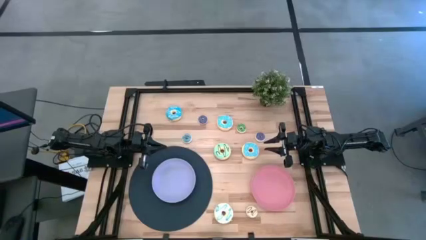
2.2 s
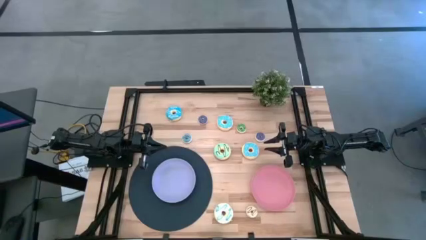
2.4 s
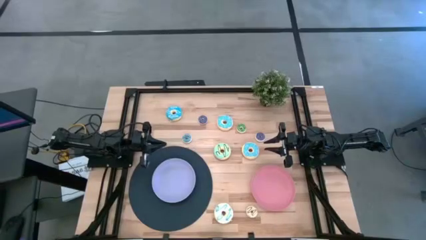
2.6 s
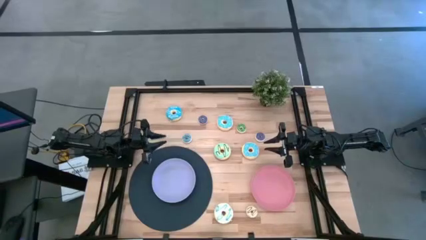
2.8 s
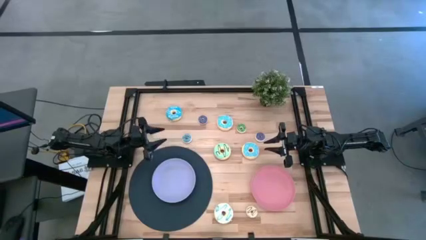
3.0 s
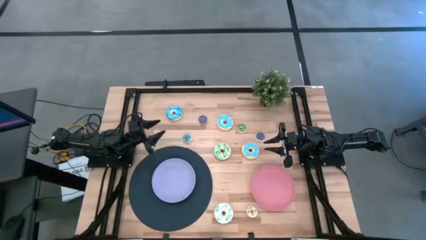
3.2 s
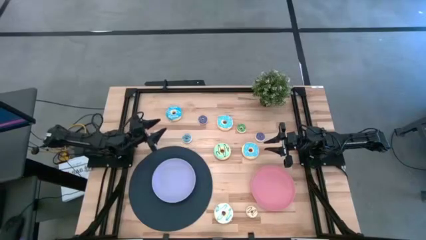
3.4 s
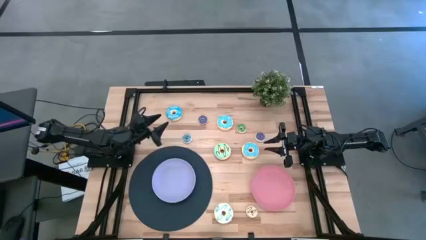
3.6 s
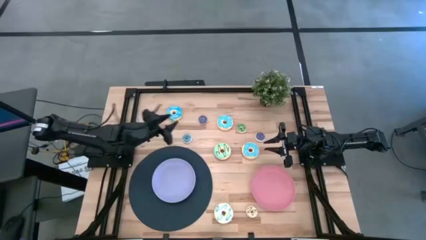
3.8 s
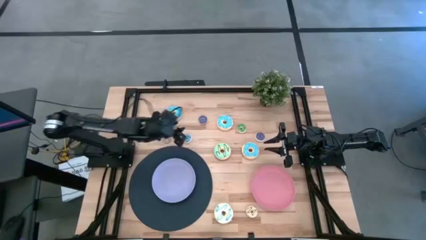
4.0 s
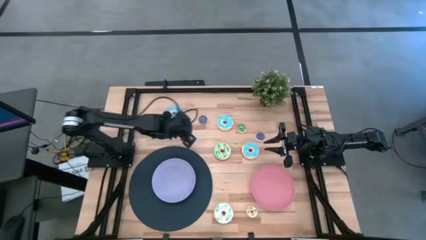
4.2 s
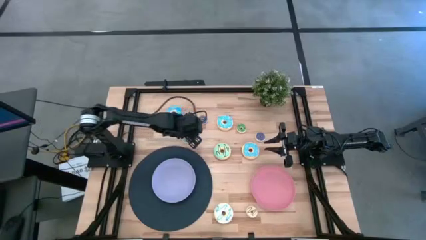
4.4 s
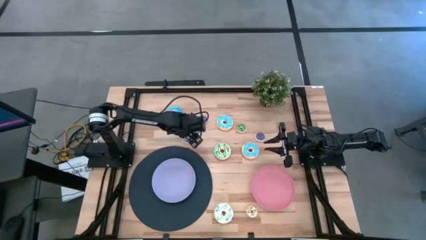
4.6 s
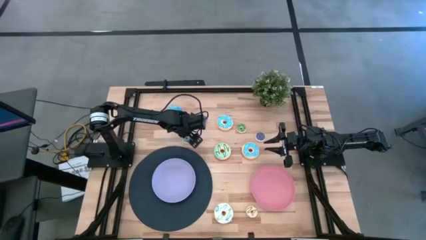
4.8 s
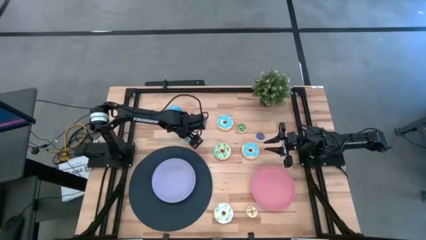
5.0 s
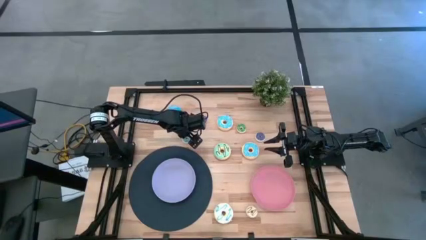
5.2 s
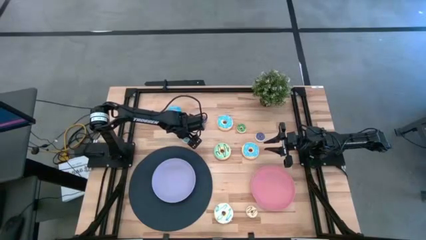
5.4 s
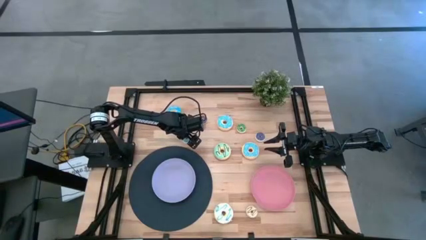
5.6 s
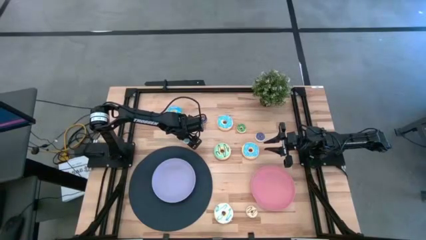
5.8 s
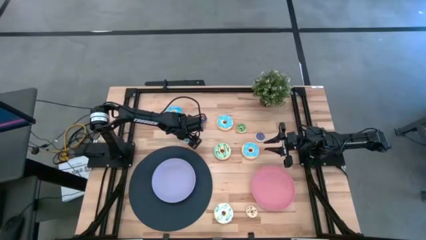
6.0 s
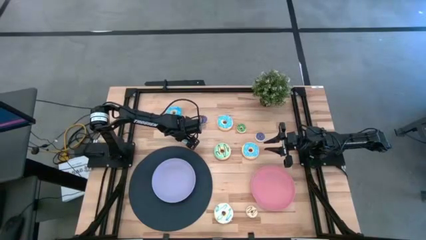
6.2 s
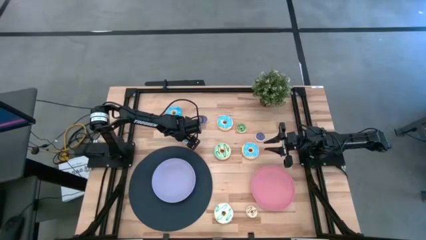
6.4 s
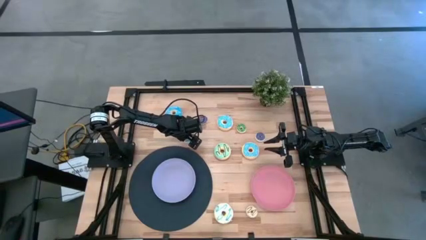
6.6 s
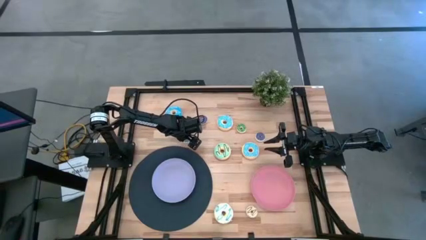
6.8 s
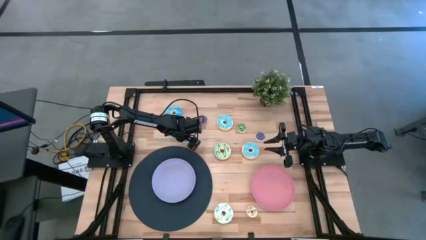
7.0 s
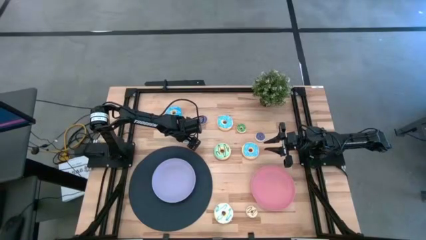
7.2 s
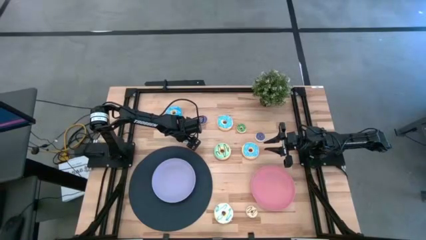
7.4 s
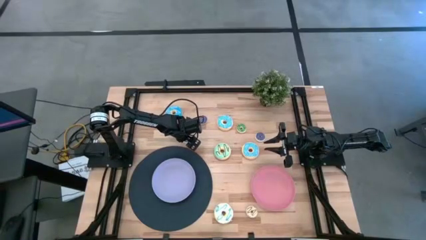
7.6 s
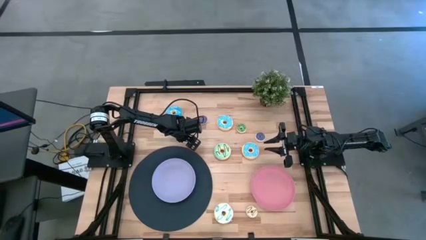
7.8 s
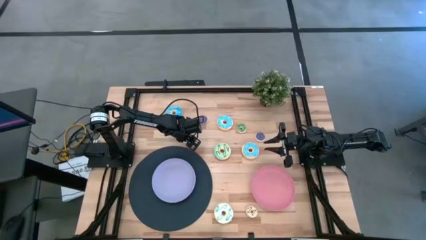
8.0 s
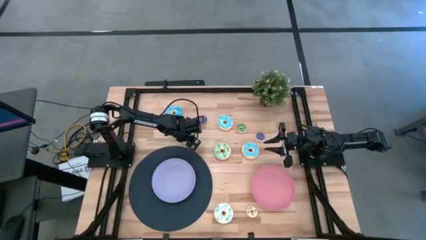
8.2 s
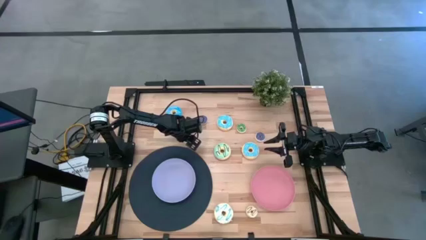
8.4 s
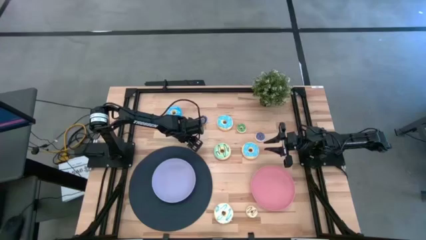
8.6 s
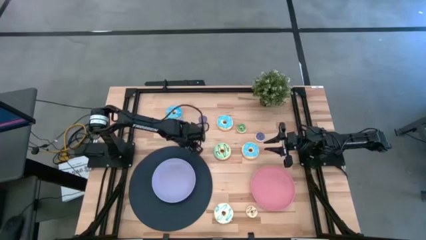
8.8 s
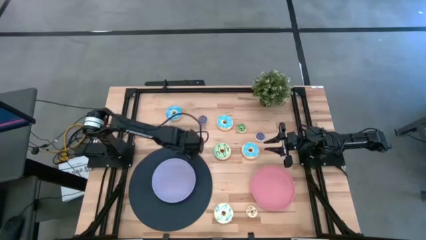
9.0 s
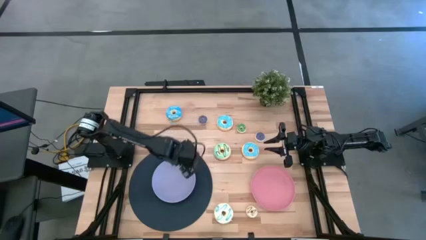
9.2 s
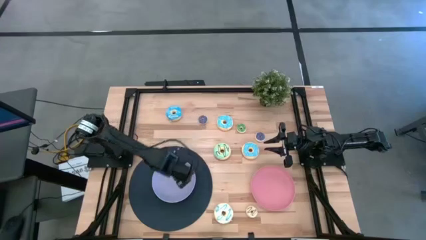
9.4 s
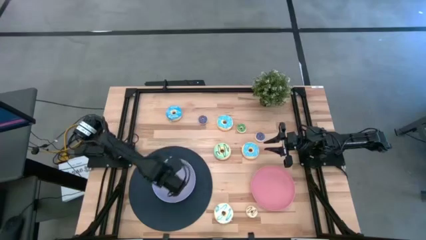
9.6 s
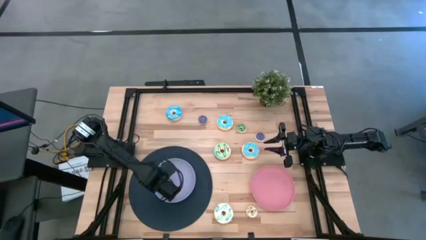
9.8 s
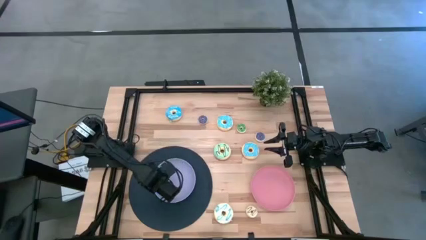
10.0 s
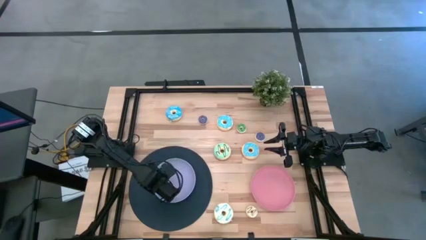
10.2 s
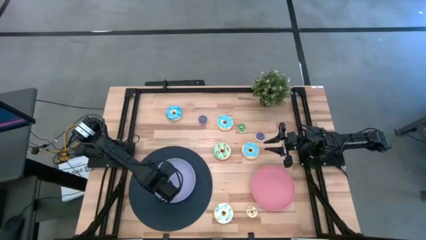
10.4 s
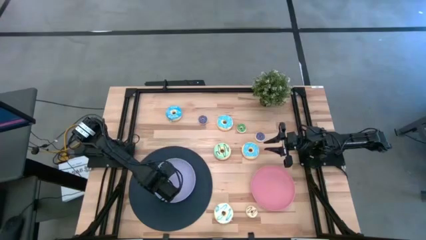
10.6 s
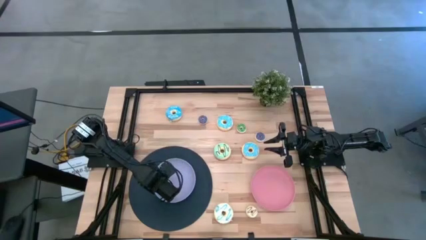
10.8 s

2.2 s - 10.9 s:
Task: Pick & Place donuts
Put the small blue donut on the purple plate

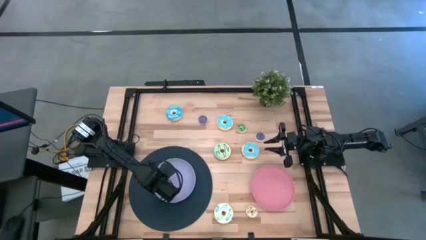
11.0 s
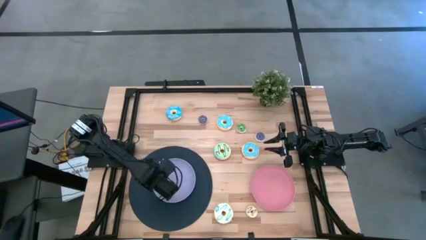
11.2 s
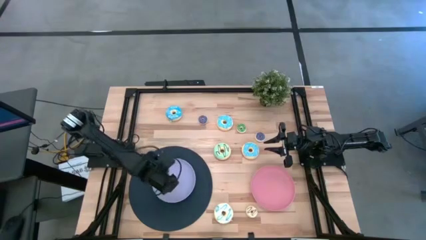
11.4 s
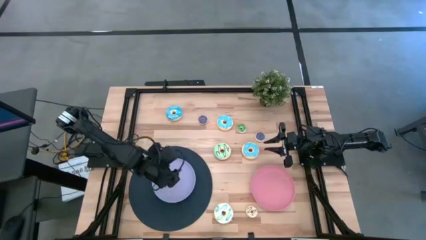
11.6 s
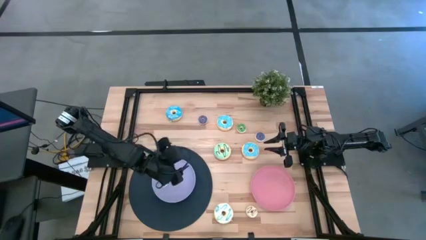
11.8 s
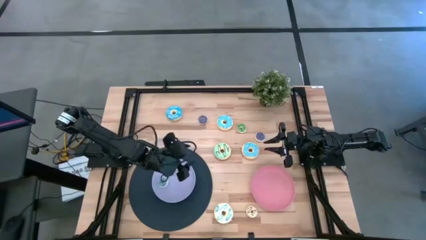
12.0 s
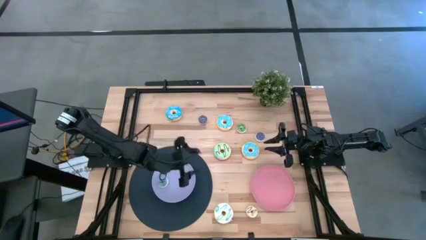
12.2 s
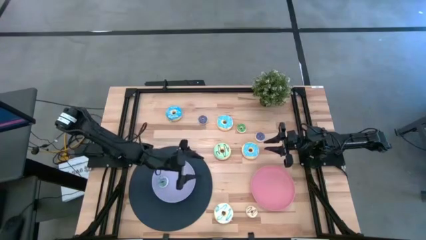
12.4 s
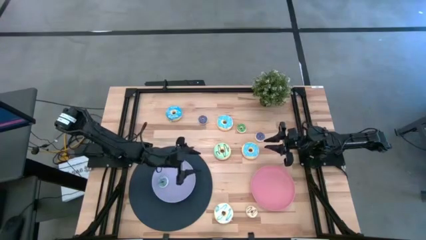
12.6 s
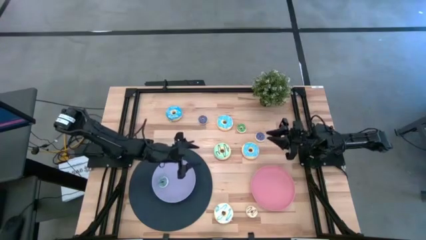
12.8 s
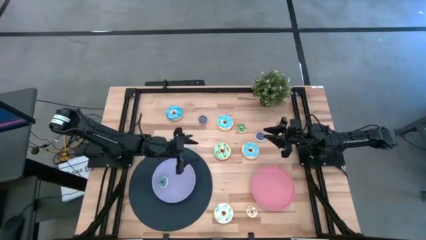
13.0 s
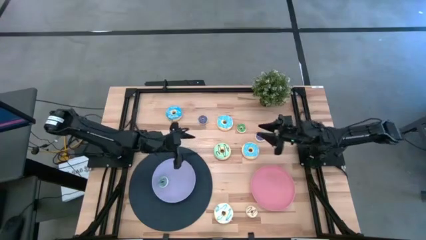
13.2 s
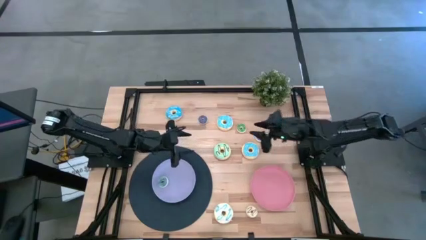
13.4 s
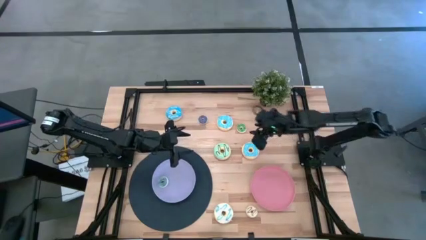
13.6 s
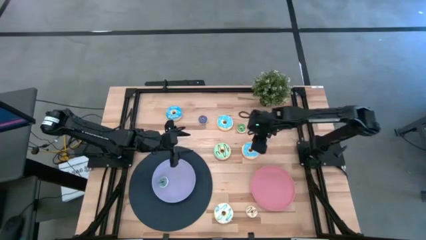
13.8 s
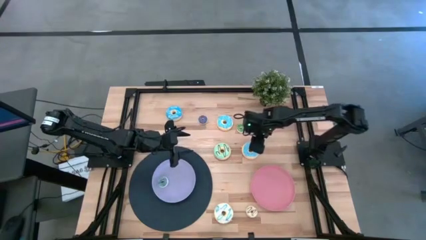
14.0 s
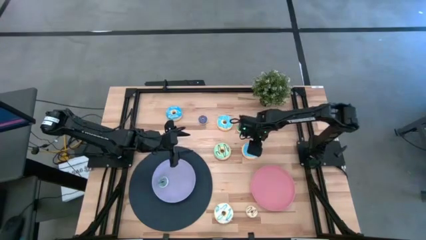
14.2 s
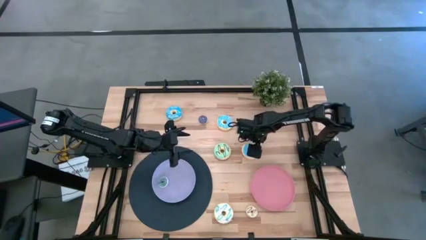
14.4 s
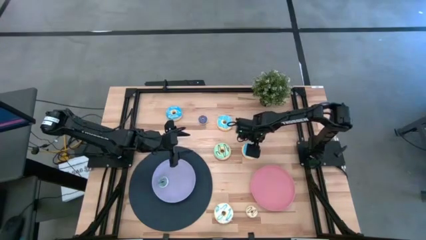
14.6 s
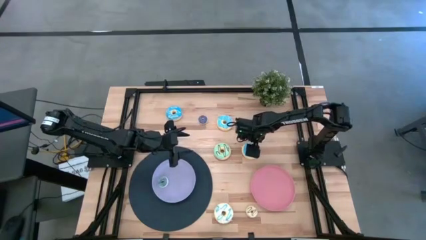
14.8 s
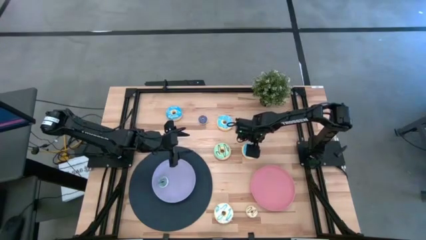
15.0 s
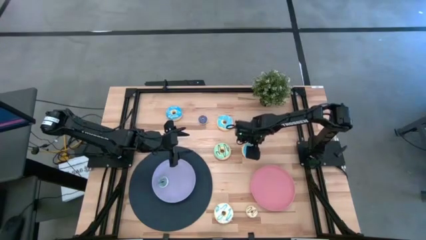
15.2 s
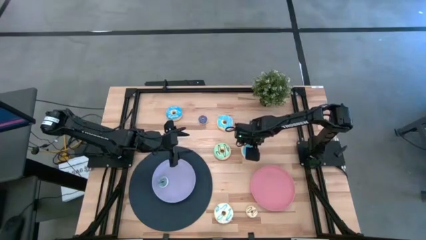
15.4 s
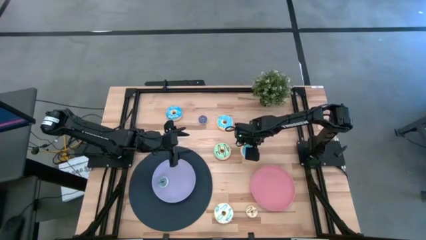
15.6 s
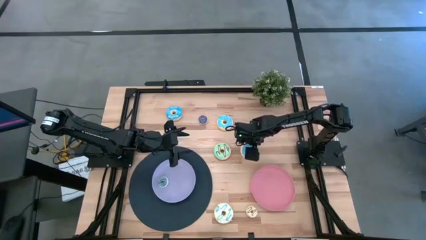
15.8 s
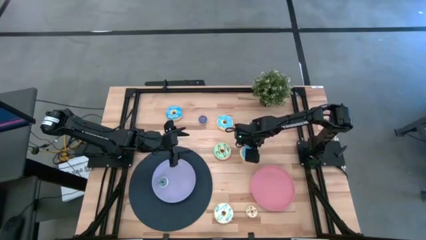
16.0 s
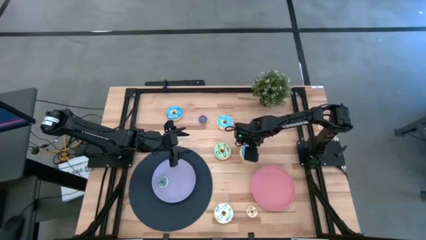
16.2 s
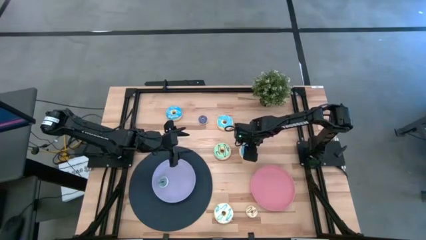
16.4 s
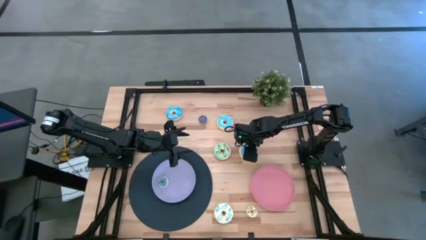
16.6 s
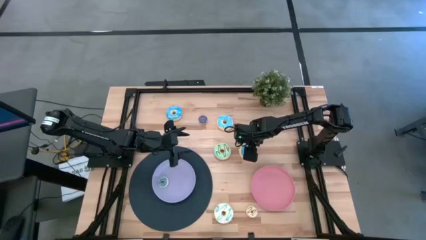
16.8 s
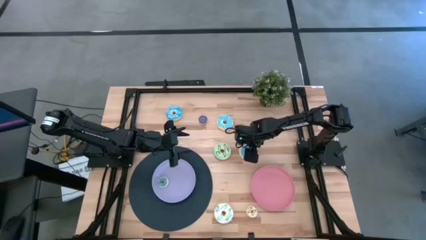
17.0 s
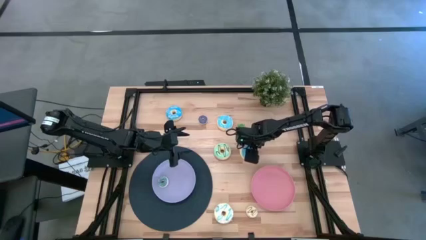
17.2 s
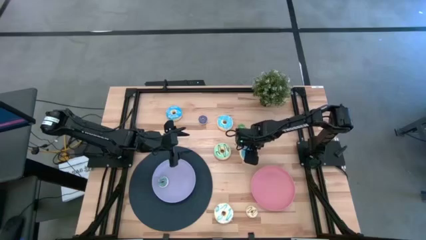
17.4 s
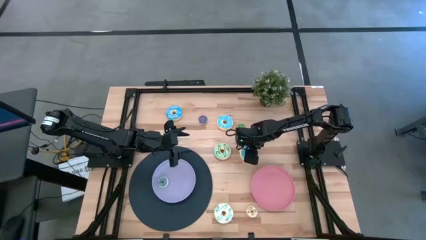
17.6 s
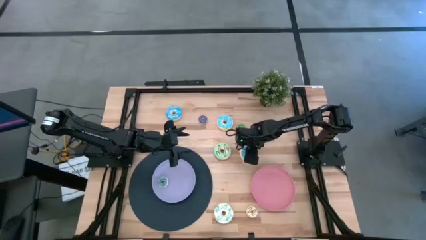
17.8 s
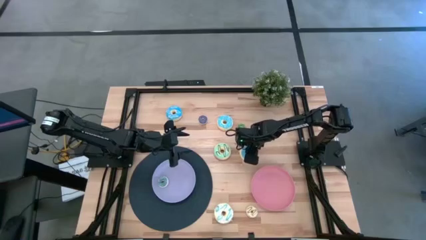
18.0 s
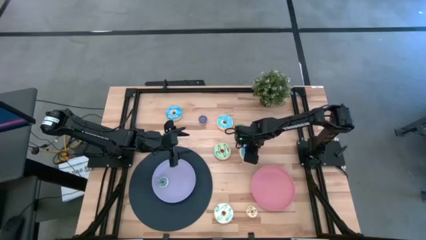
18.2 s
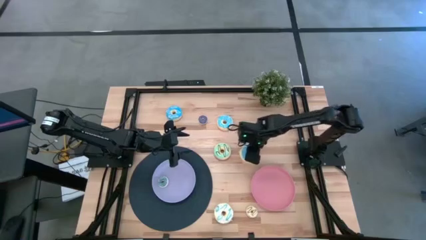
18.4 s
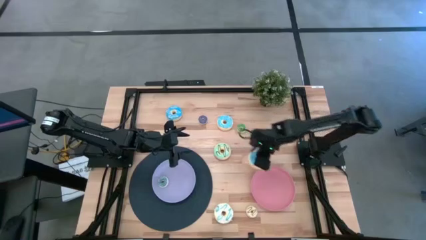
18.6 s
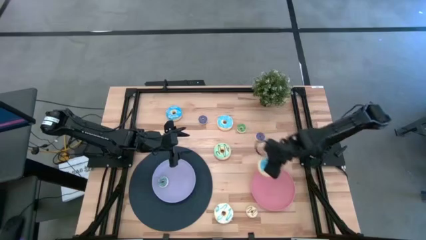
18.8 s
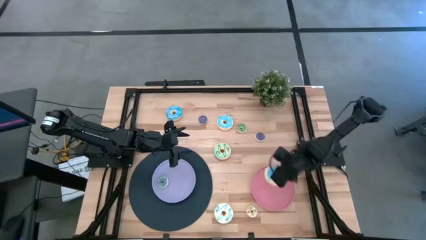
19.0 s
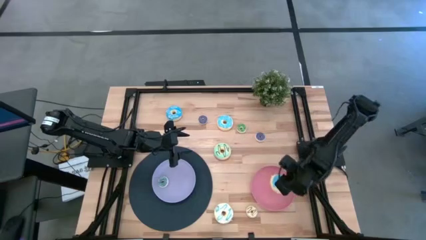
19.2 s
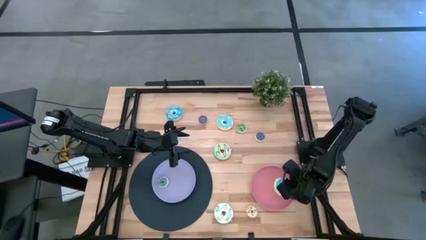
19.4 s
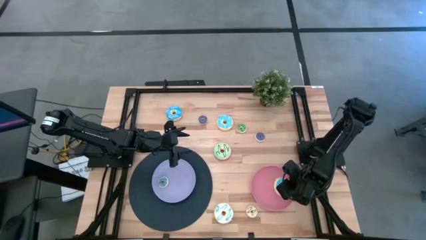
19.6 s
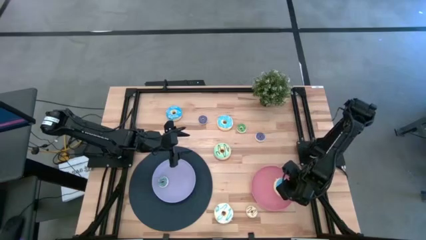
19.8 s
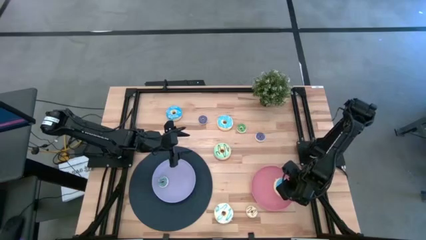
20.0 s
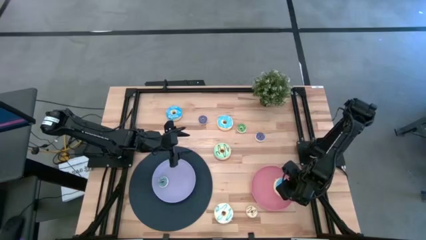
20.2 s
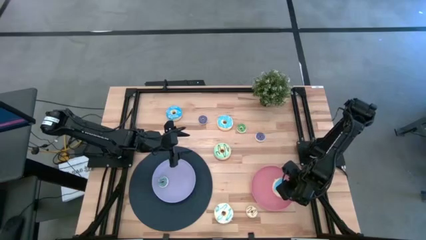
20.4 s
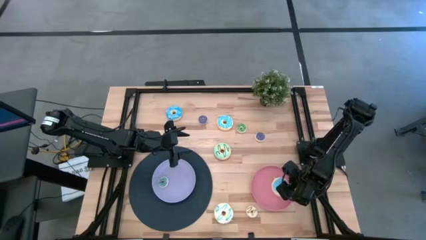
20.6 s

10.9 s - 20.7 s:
Put the bottom large blue donut on the pink plate
